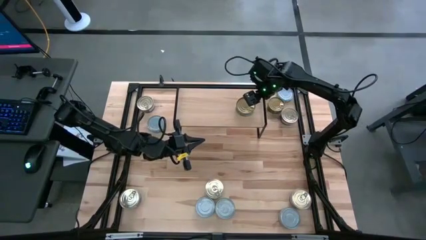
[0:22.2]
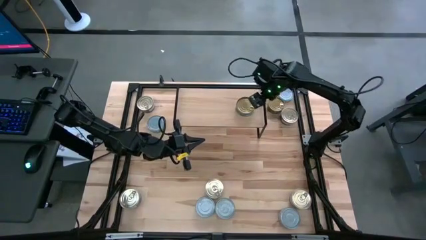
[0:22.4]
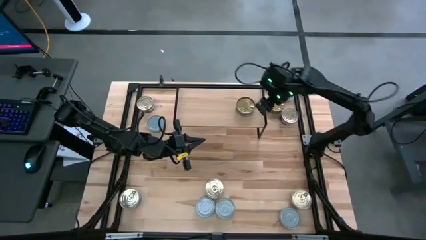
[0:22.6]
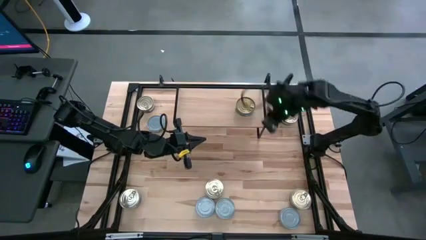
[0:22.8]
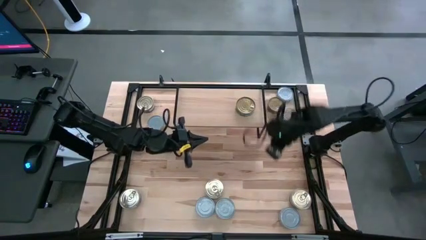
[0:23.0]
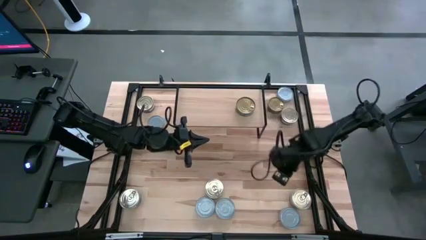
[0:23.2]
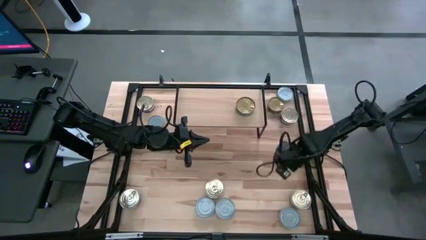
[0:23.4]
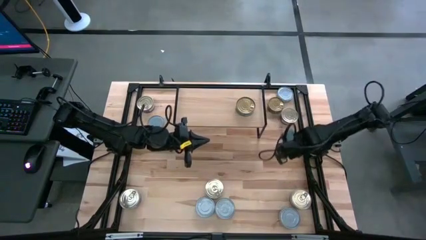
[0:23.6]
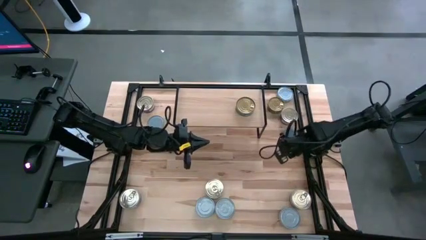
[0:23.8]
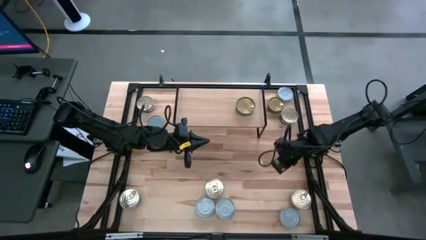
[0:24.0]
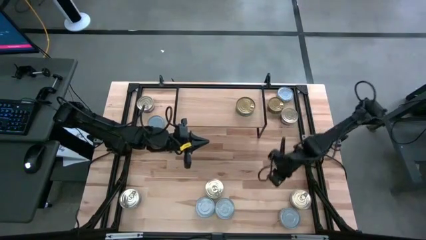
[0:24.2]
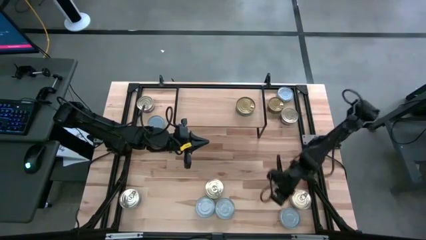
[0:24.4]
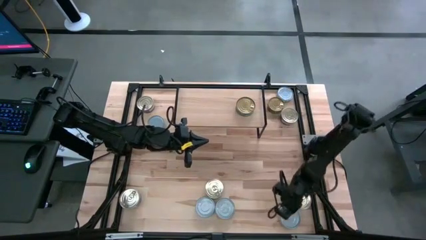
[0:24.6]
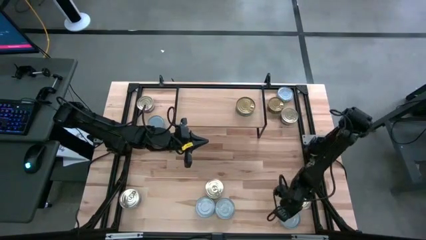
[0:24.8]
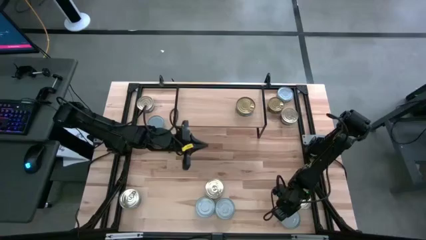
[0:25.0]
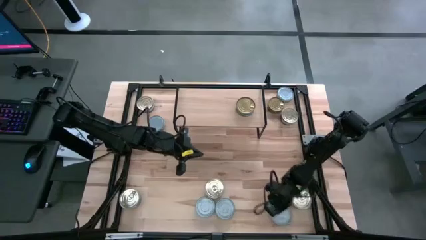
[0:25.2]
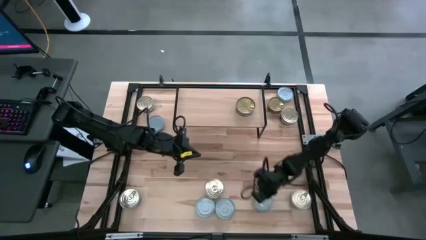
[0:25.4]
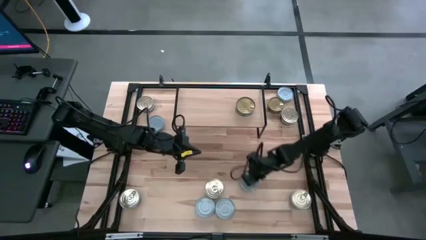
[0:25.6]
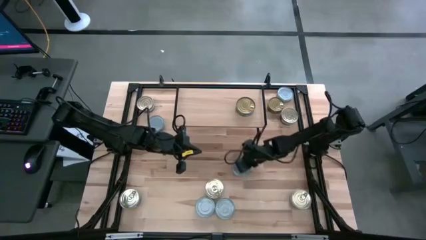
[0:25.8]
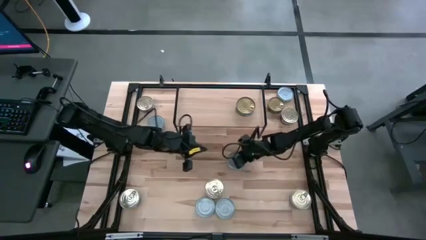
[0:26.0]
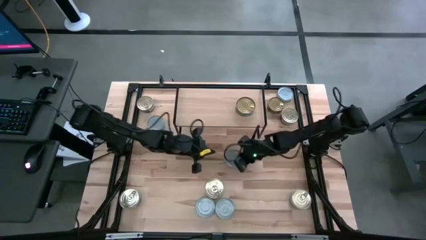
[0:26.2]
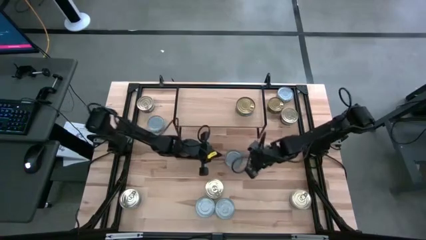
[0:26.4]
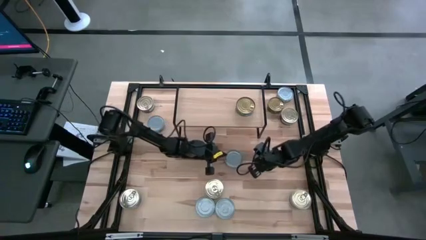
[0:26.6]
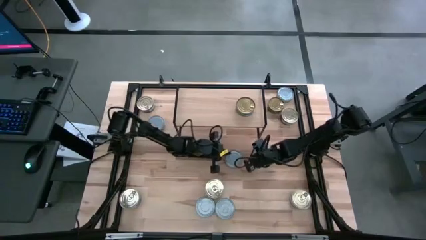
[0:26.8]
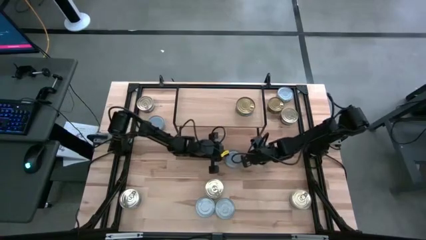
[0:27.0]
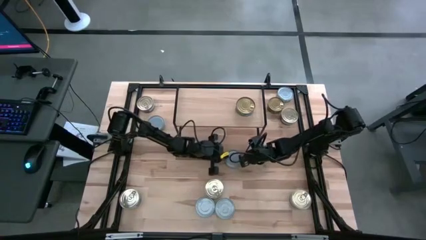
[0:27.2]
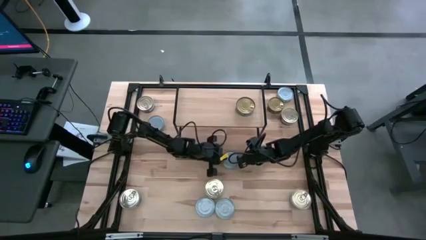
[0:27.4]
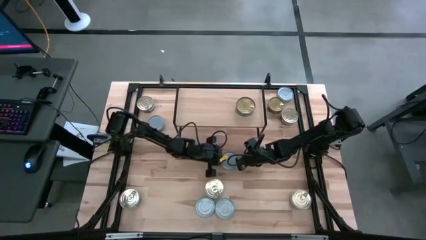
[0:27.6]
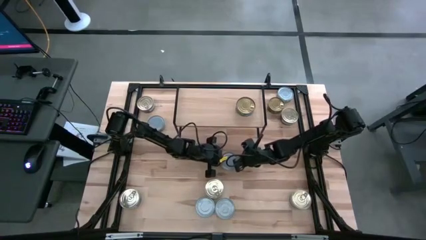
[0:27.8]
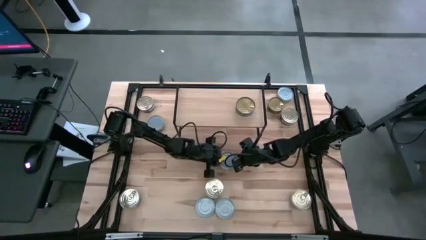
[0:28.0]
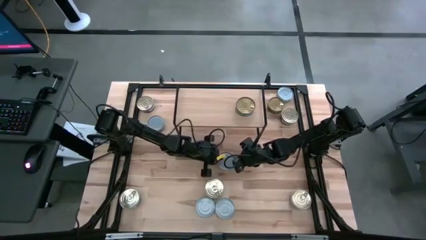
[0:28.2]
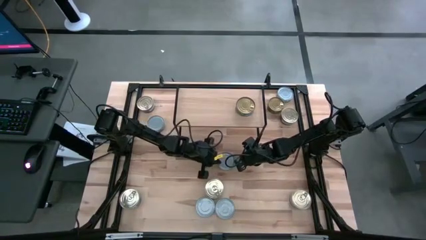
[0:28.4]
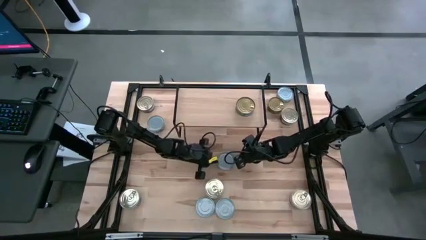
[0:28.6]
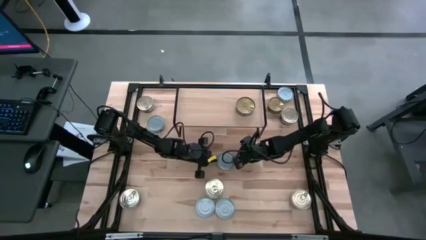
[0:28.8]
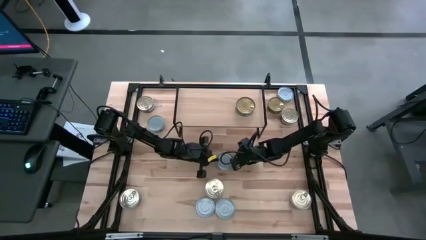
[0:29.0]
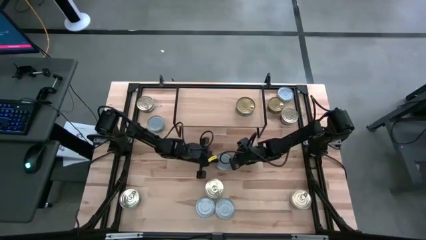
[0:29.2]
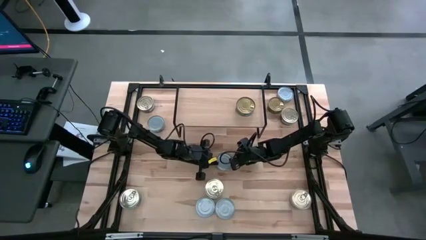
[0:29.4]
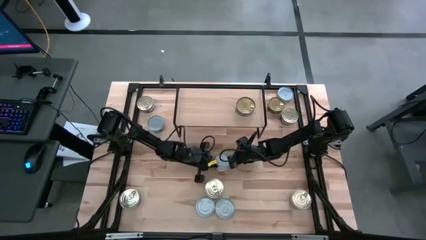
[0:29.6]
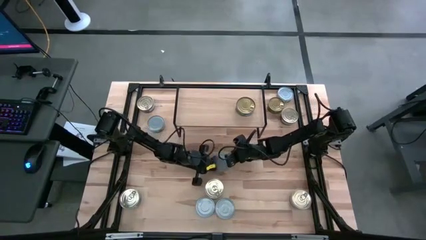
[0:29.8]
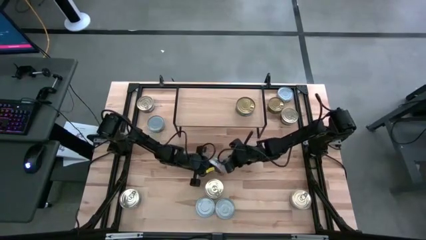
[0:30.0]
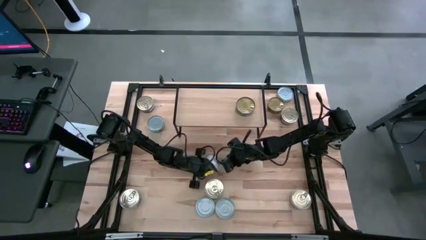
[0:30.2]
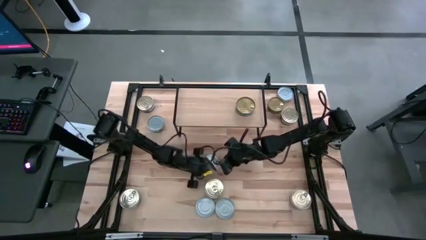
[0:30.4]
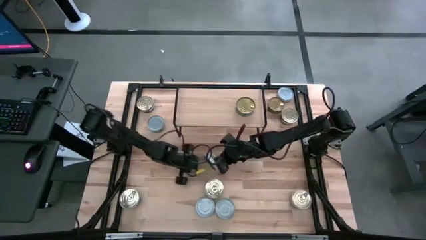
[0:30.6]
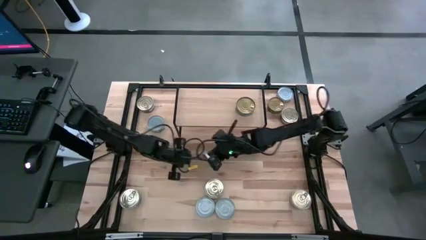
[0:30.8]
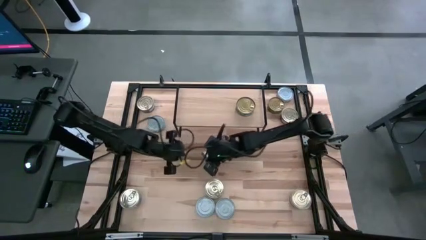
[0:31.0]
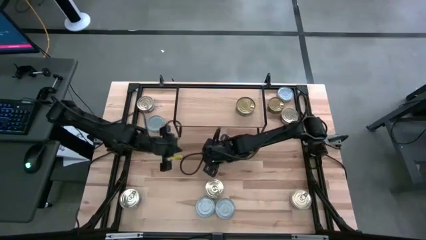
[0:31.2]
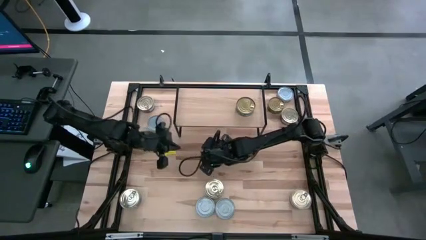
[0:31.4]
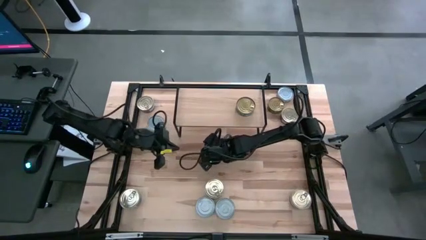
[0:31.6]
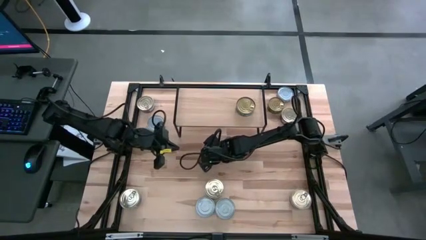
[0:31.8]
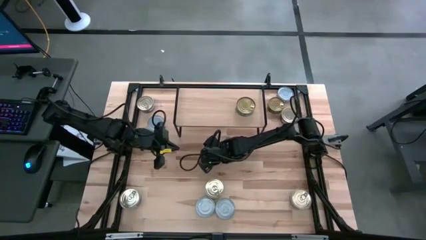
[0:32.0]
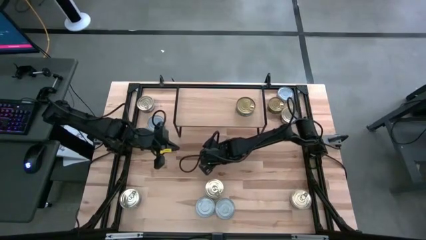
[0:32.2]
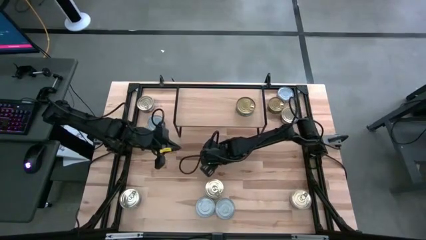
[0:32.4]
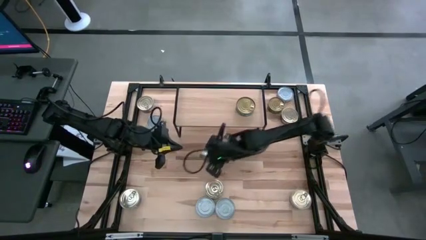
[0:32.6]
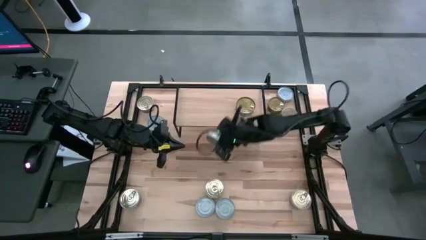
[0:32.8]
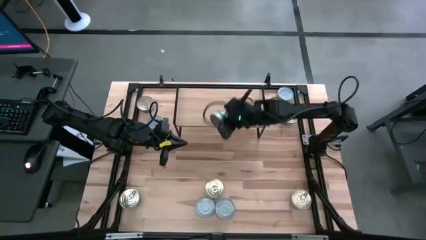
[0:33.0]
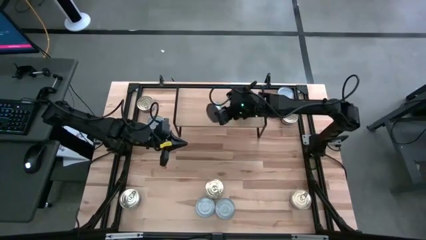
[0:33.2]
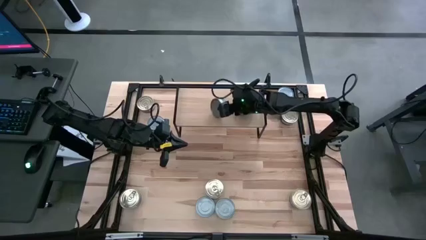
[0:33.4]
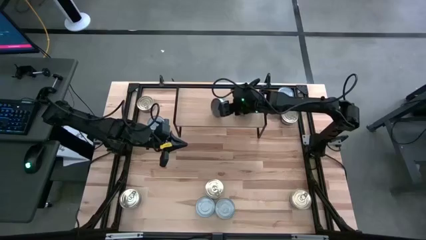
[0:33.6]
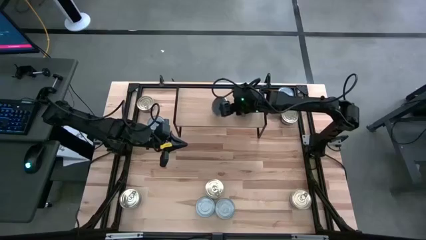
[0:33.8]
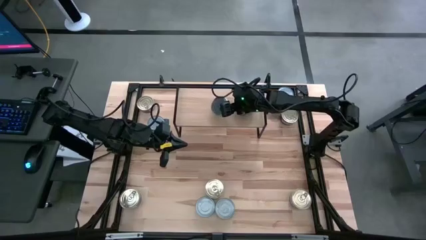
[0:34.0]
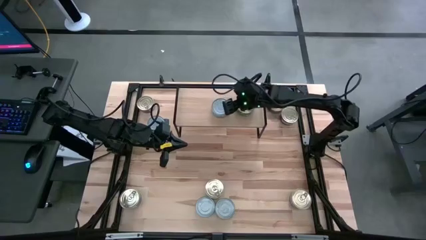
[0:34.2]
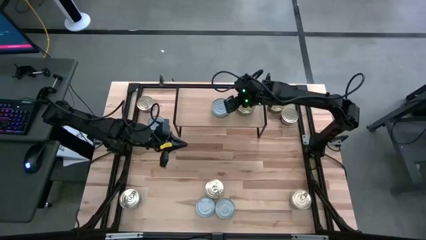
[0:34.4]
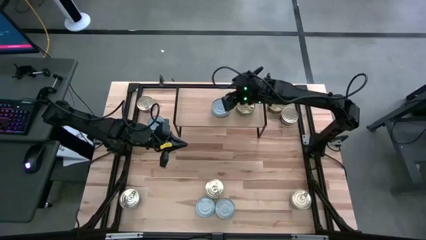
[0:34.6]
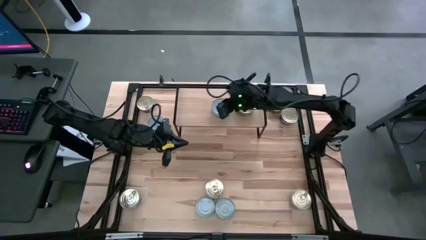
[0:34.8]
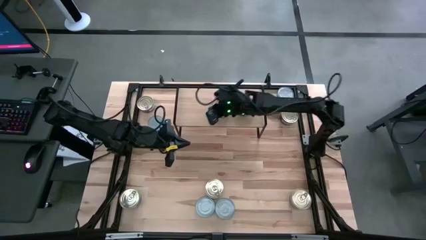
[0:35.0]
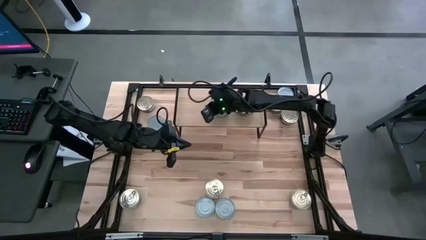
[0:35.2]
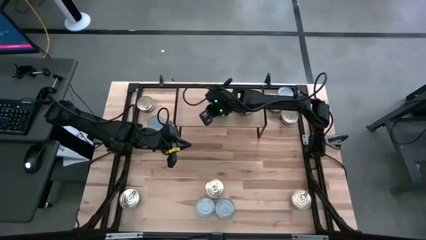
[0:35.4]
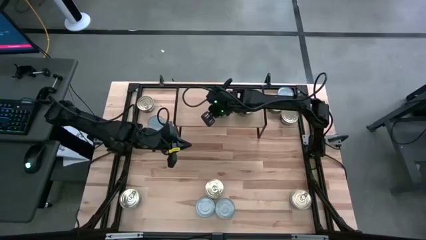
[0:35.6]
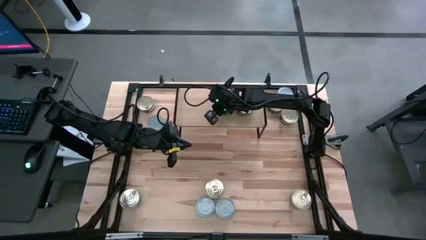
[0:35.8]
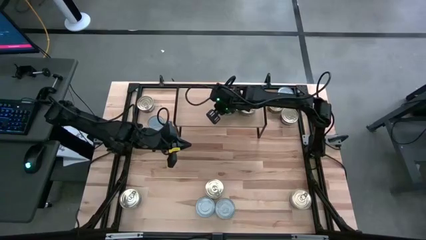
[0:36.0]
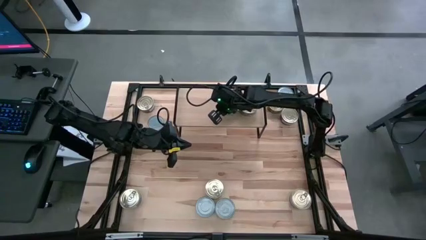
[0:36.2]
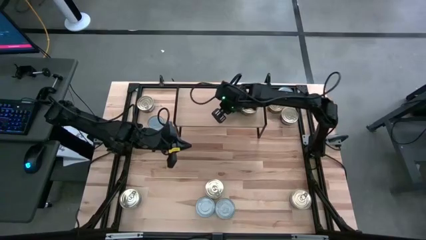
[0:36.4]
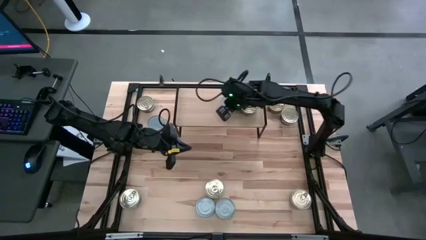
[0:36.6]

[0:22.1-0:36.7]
Task: Stack canned seafood by type on shelf
Put the white-green tuna can on the shelf
